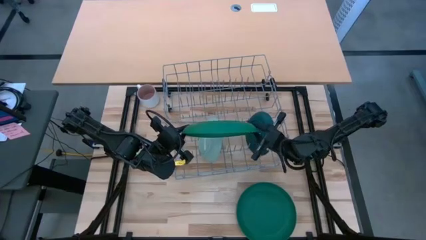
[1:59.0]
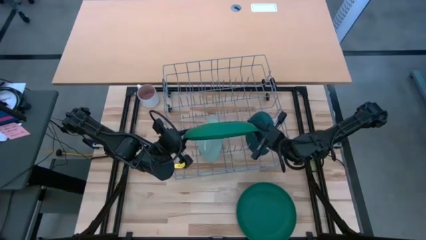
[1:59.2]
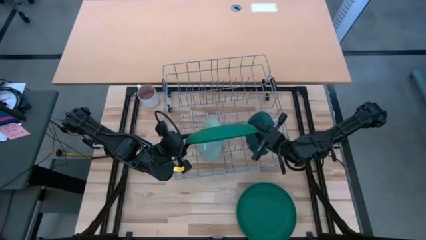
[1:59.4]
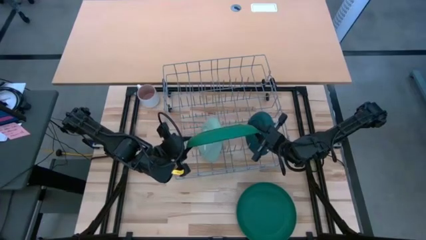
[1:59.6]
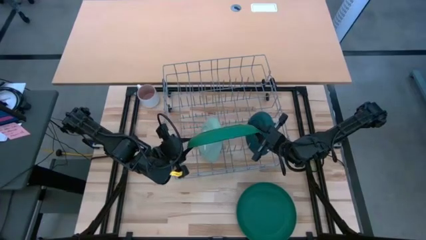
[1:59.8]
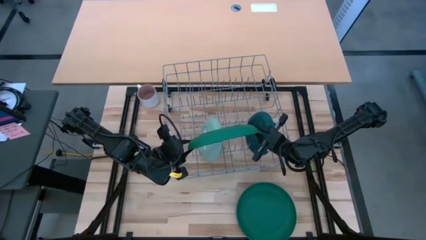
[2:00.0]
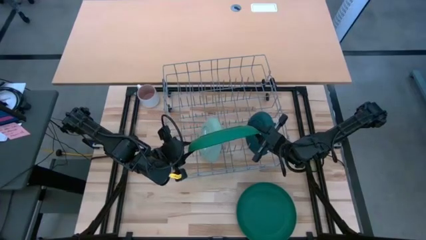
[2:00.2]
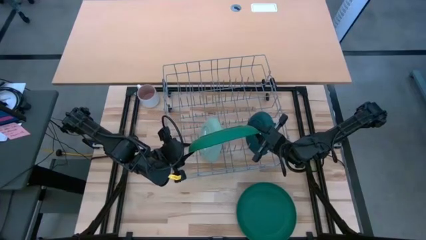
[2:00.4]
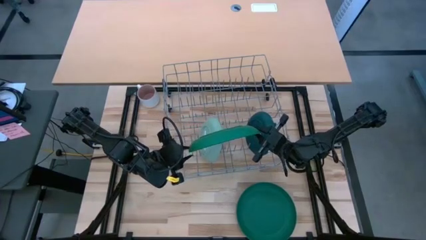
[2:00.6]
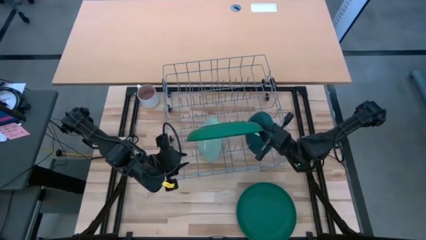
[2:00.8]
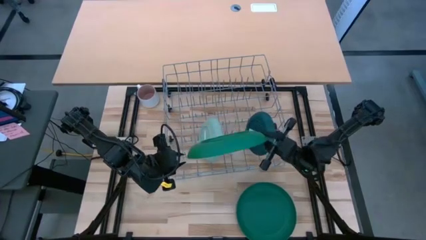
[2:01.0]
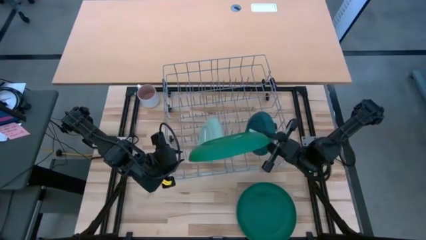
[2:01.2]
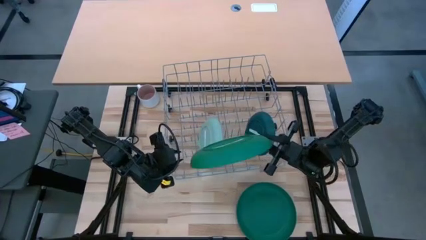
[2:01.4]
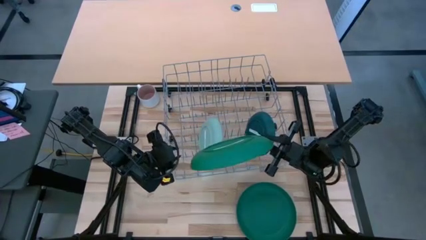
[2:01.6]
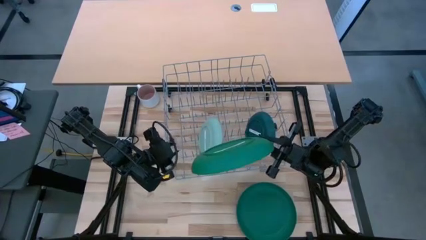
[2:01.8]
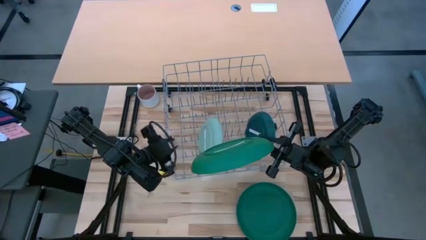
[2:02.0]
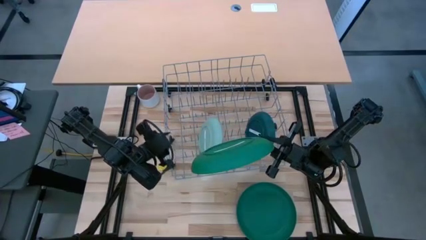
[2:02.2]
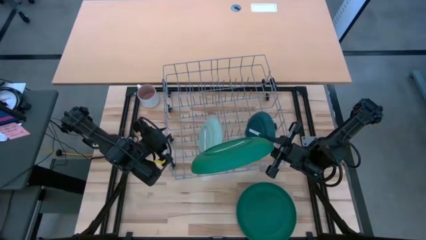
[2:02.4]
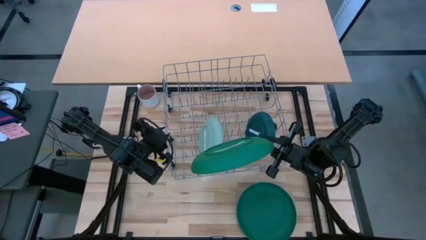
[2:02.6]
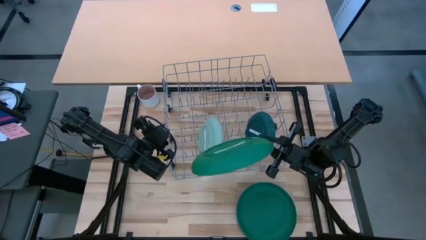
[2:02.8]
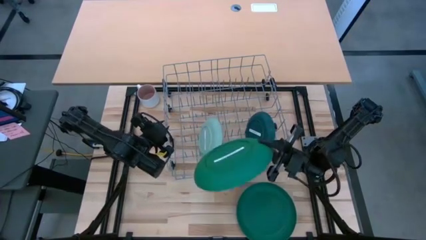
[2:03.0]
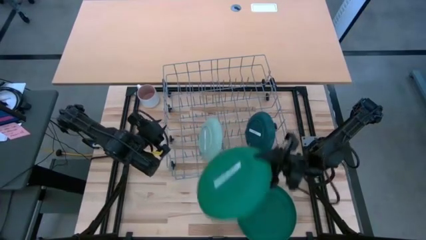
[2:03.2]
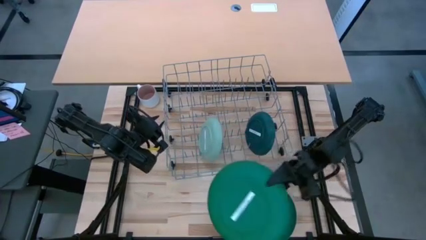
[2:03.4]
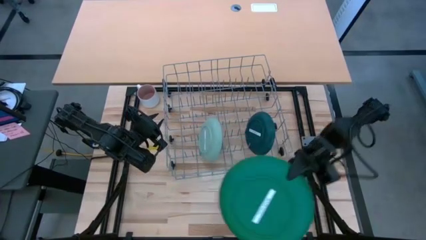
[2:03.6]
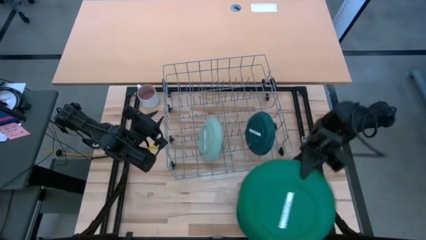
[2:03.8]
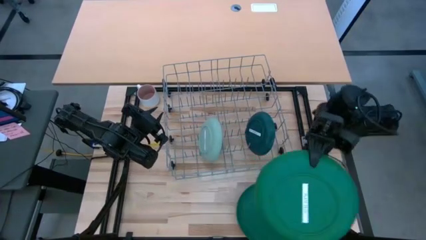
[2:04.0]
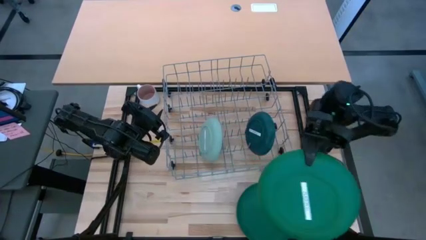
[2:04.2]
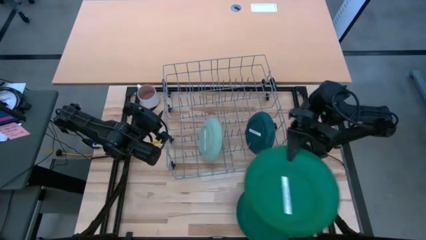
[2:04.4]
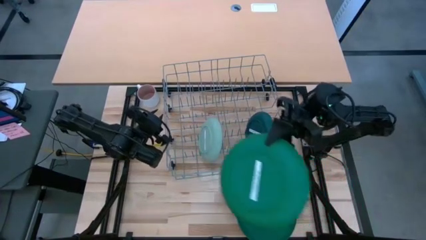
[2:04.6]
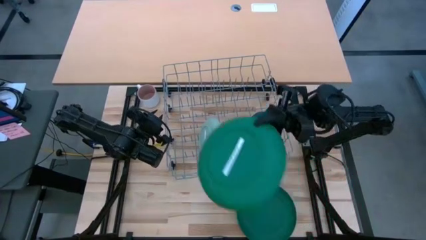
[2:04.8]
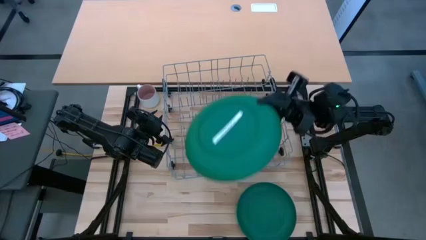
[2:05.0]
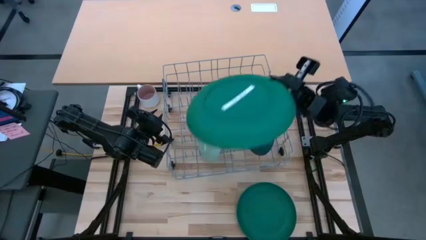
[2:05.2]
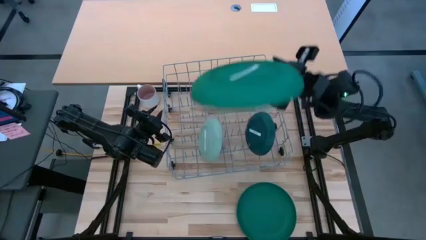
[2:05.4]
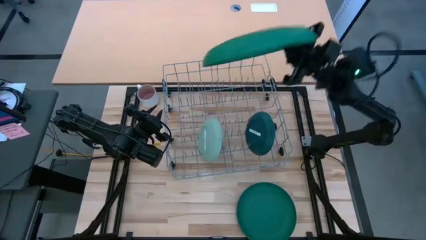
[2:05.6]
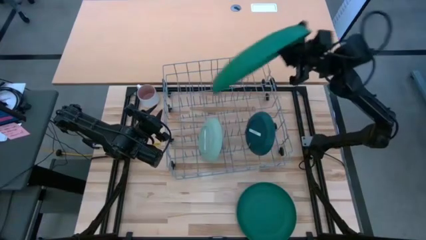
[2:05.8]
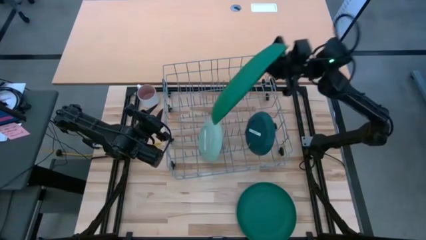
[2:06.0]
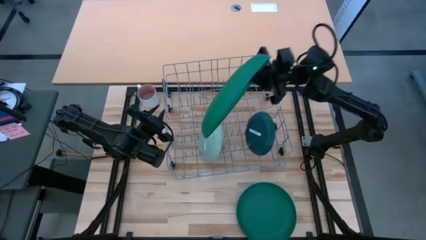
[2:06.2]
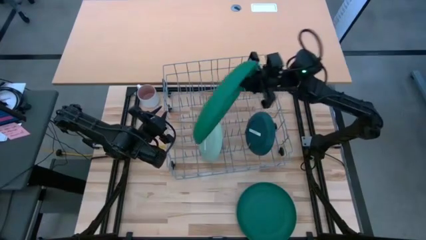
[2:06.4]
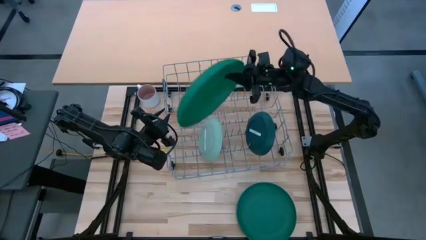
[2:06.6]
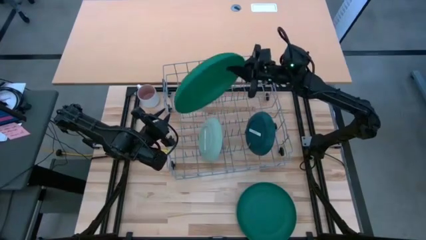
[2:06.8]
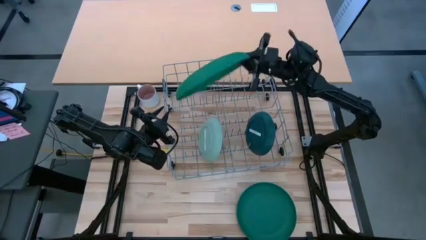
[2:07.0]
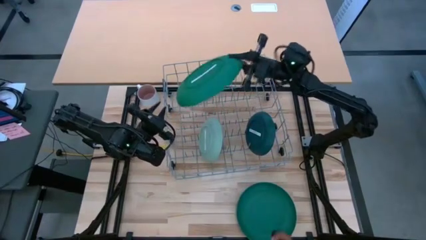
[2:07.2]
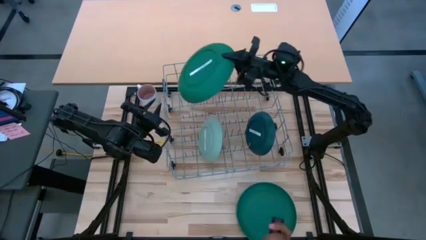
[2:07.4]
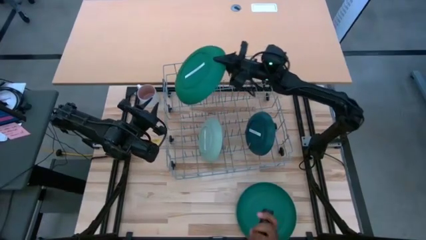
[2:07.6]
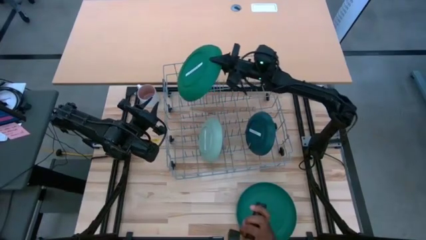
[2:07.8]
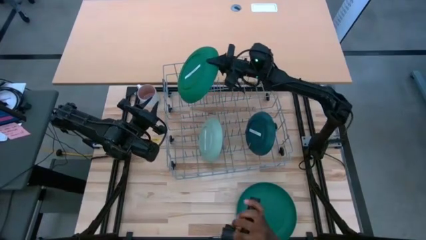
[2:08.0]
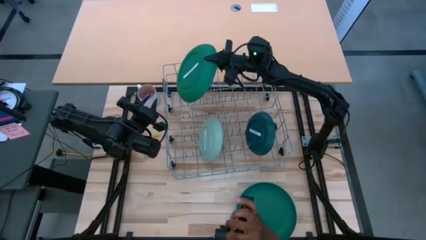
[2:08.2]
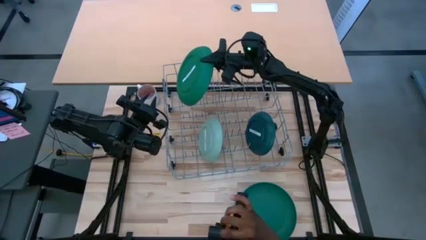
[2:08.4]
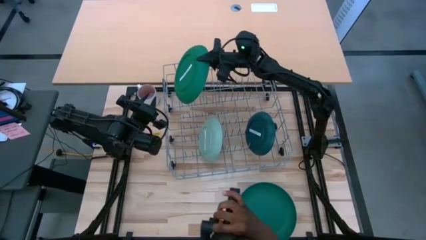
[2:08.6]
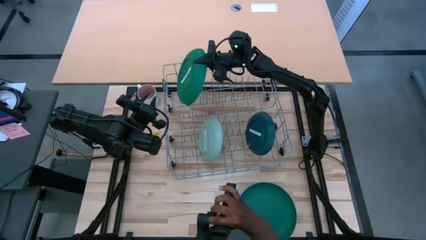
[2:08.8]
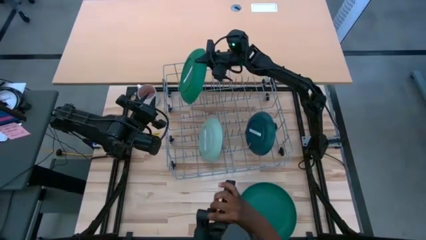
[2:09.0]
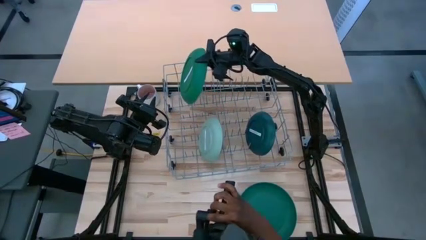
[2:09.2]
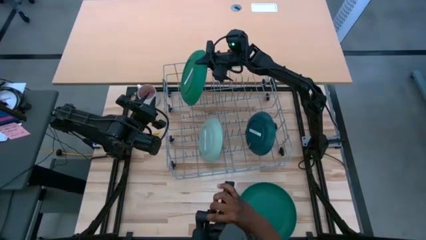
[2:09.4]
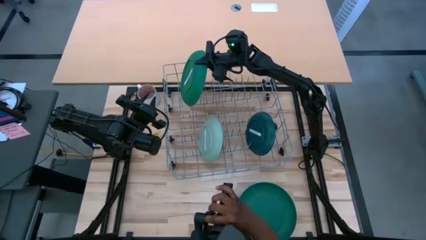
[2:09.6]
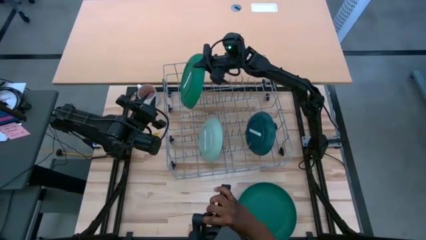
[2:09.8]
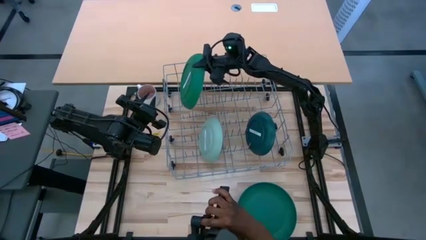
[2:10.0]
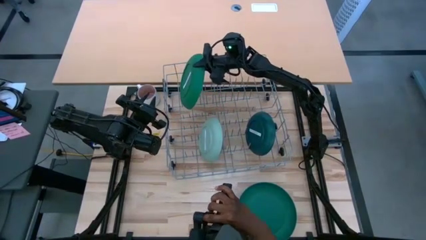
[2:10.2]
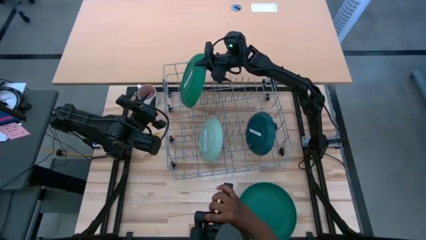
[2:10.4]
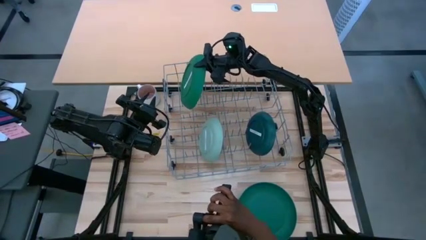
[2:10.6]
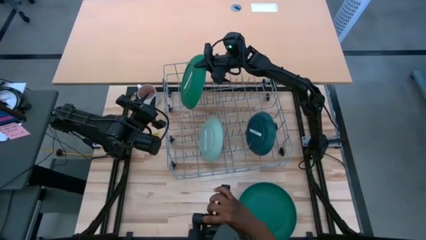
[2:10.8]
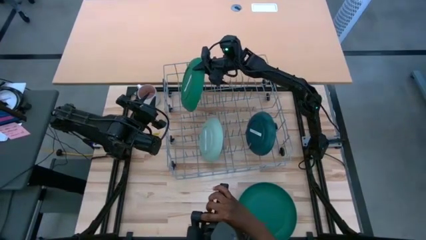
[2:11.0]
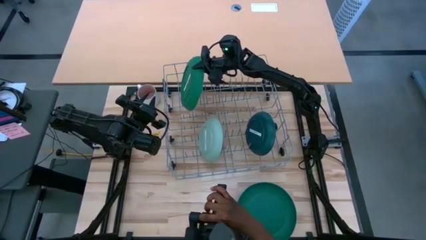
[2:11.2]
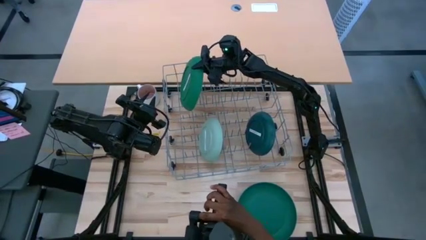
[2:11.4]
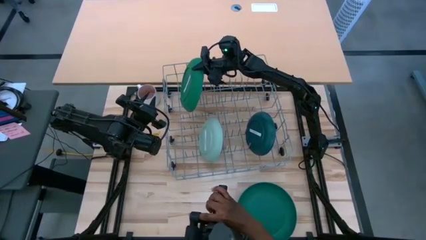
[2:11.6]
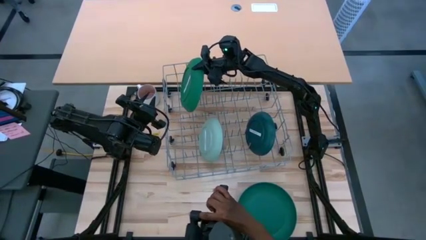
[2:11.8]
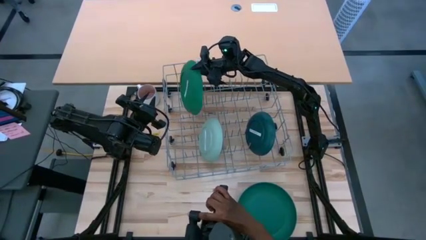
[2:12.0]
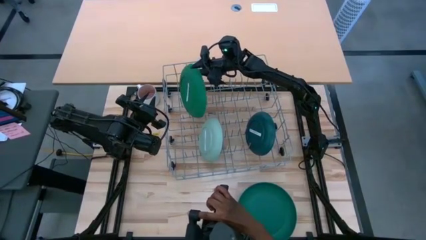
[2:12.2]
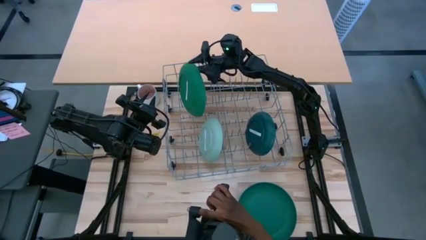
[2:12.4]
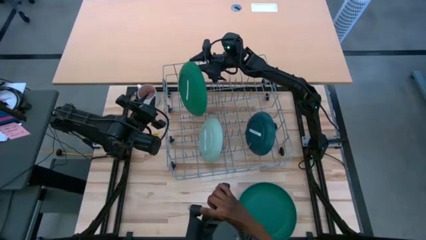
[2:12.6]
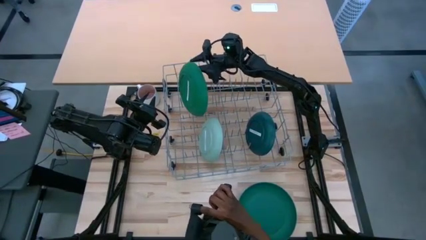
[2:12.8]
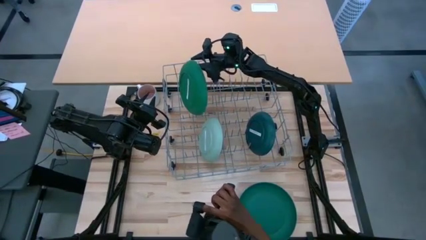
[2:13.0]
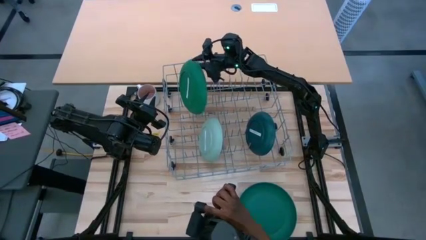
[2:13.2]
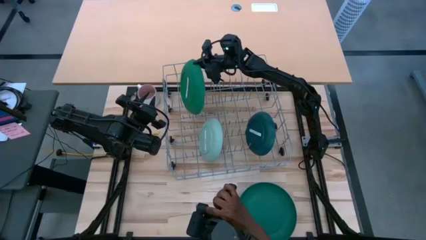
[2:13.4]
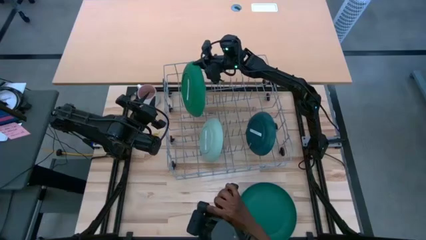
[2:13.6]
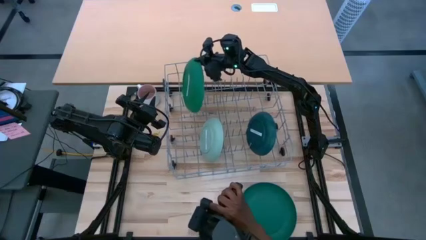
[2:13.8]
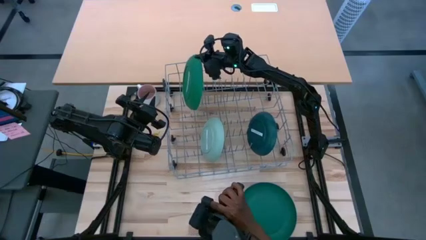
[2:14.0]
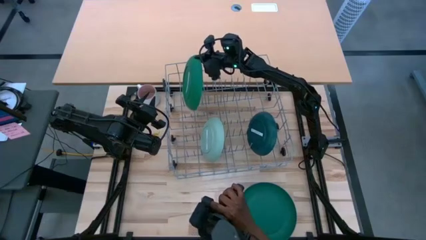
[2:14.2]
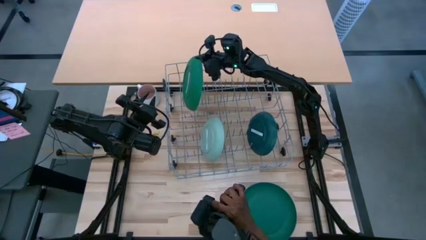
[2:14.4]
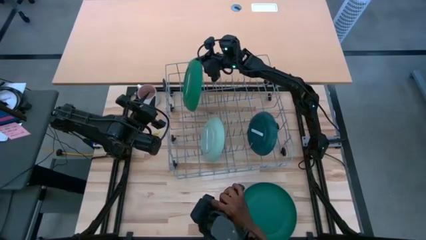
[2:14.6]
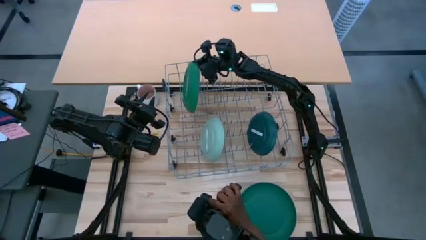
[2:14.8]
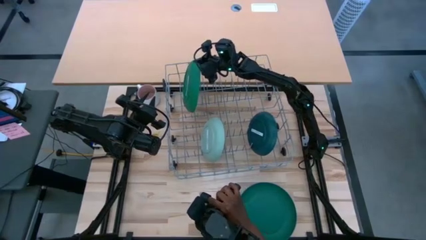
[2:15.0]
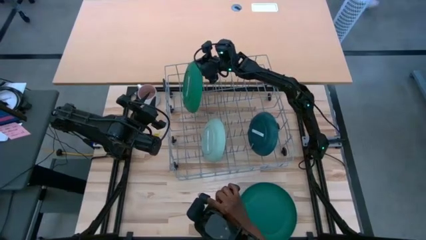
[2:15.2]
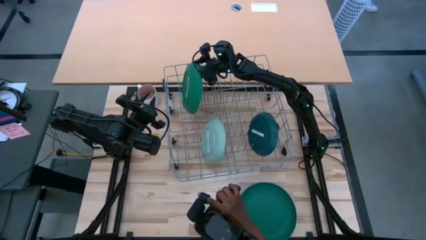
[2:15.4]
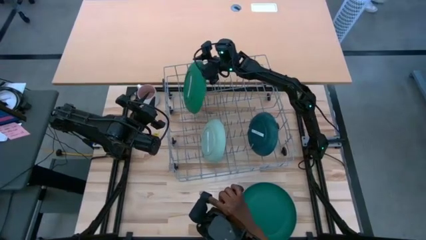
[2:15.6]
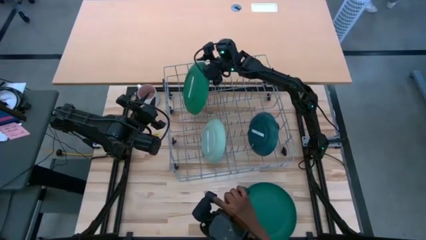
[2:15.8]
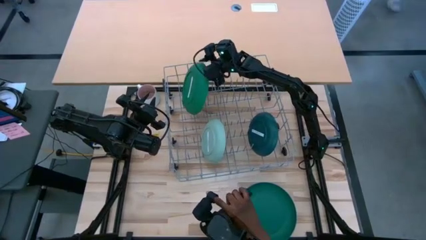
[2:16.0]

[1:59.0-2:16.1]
Task: Sort dishes
Put a green plate in the dish rack
